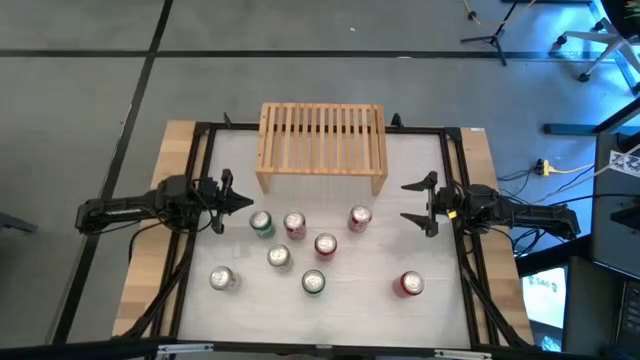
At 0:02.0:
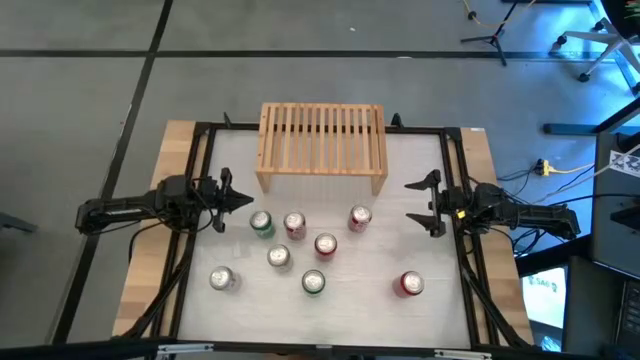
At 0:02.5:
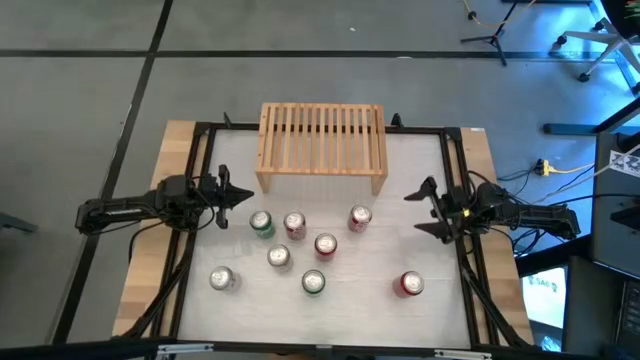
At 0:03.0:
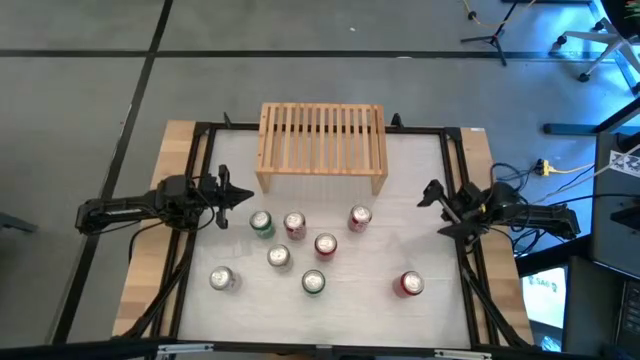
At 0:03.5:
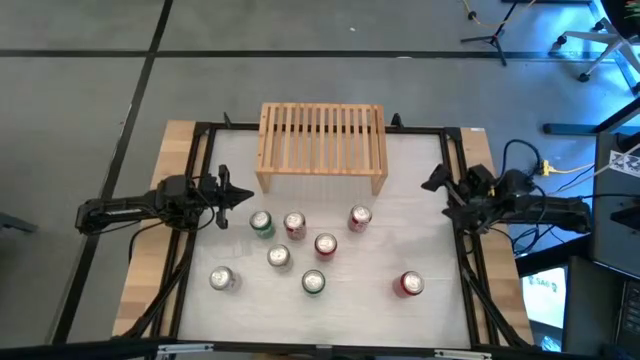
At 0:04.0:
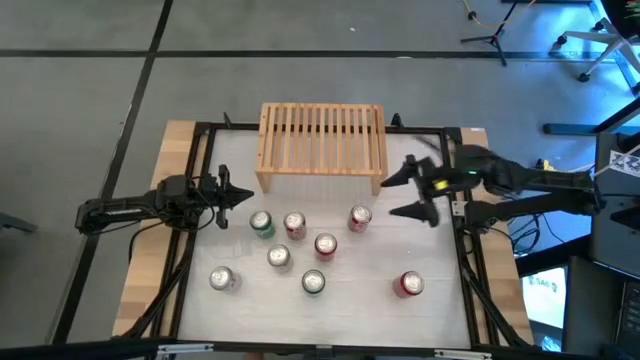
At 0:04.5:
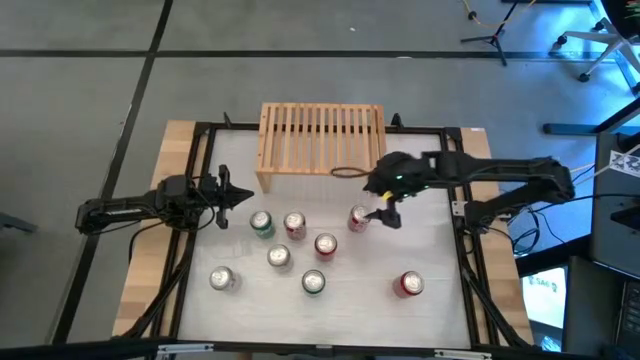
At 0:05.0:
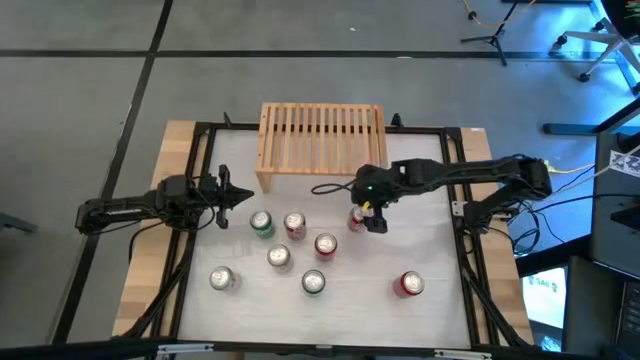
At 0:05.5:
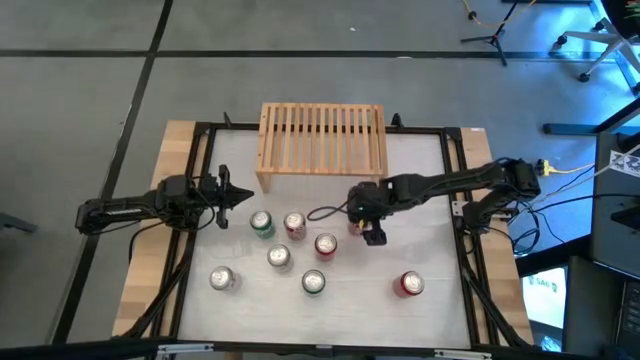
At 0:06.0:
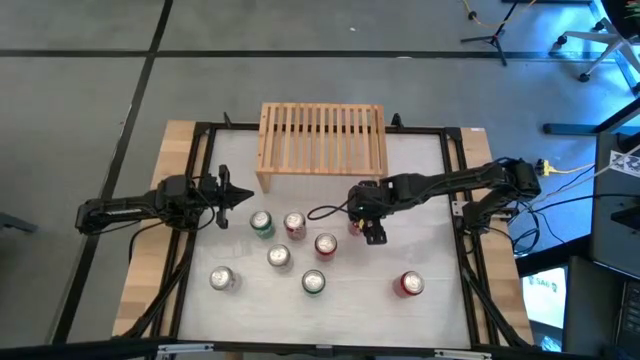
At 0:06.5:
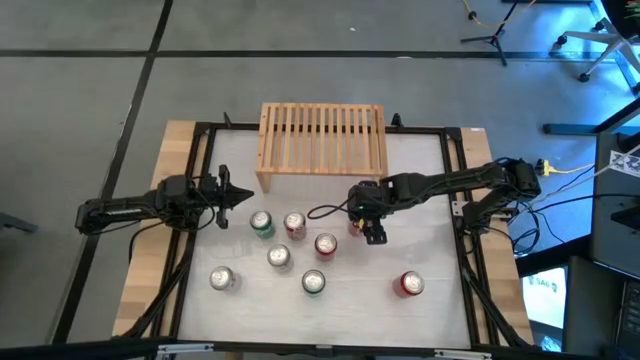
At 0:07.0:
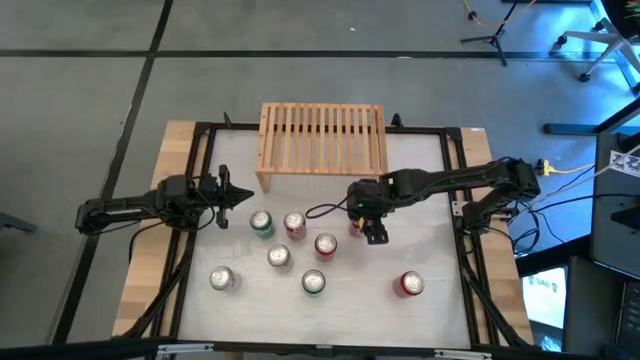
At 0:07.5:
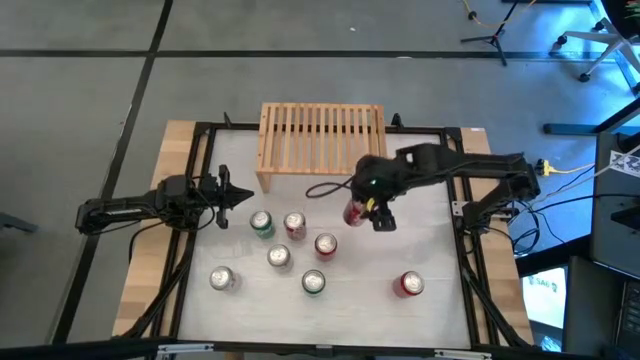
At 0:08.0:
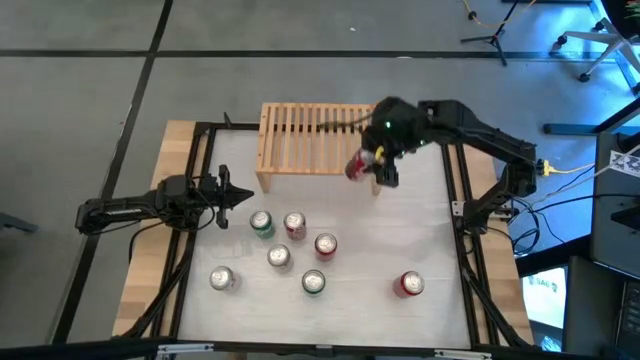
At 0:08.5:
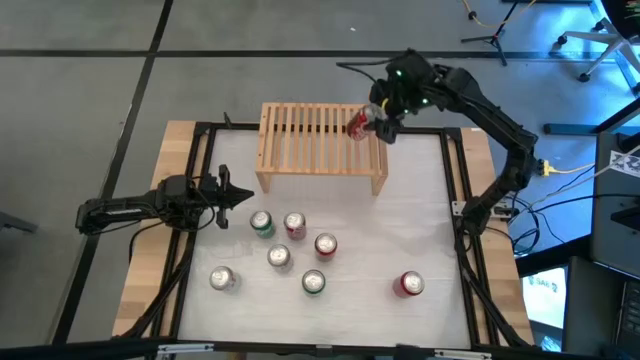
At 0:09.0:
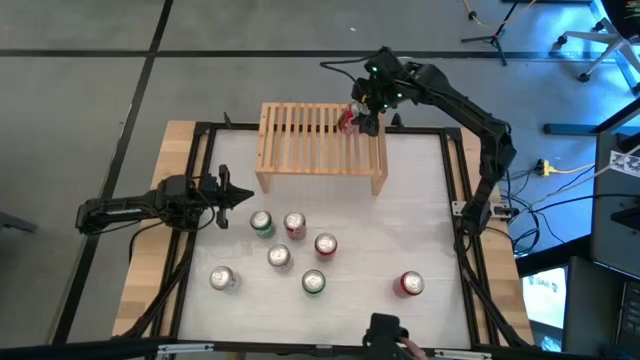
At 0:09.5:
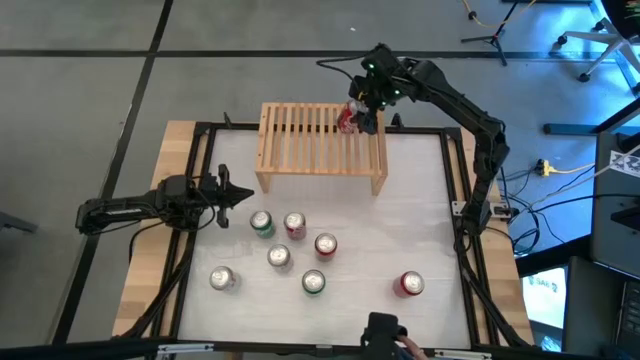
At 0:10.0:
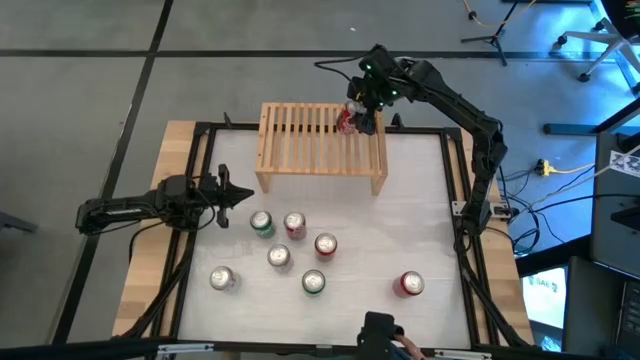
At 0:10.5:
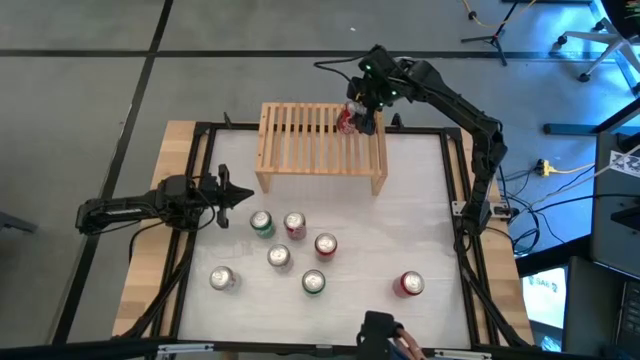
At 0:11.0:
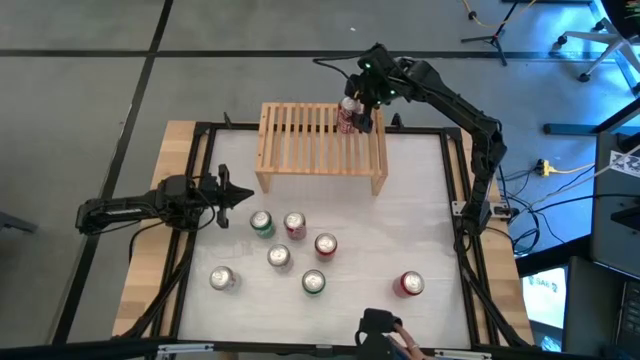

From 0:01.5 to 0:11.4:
Task: Place canned beverage on shelf
Put the right/white red soda can on the shelf

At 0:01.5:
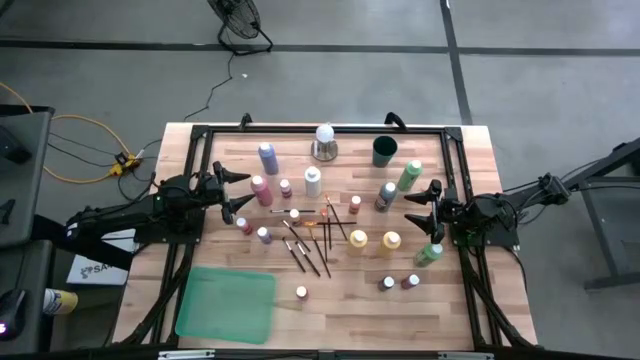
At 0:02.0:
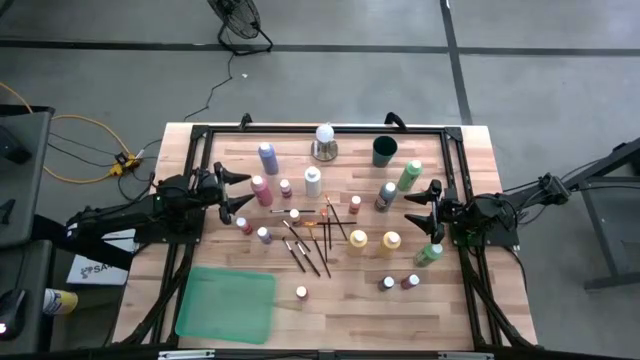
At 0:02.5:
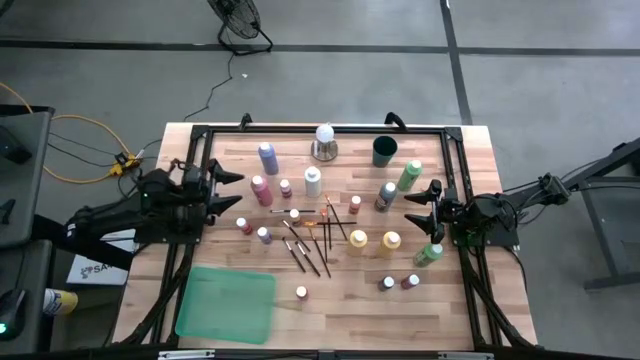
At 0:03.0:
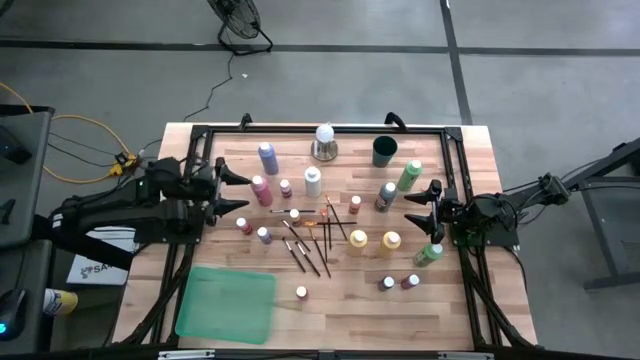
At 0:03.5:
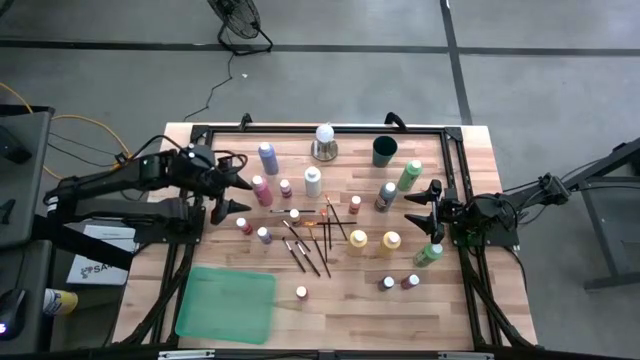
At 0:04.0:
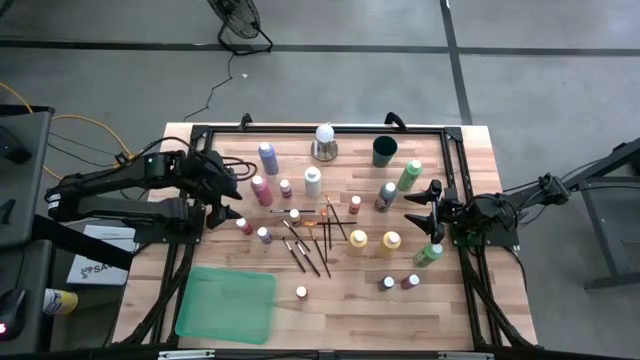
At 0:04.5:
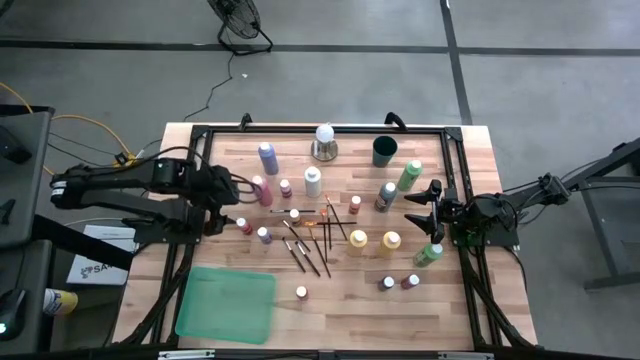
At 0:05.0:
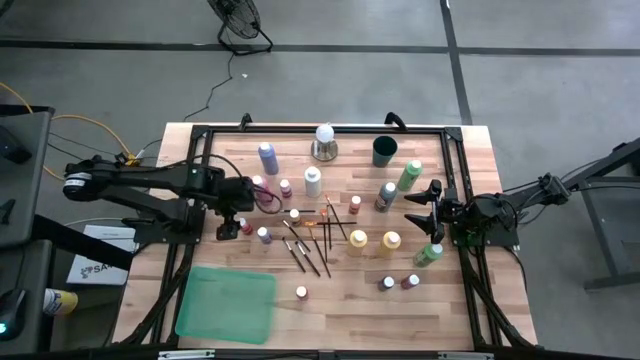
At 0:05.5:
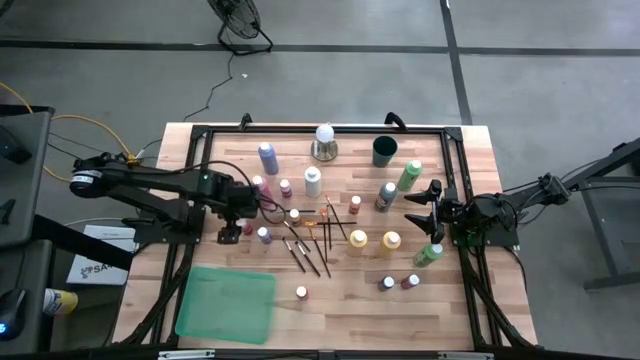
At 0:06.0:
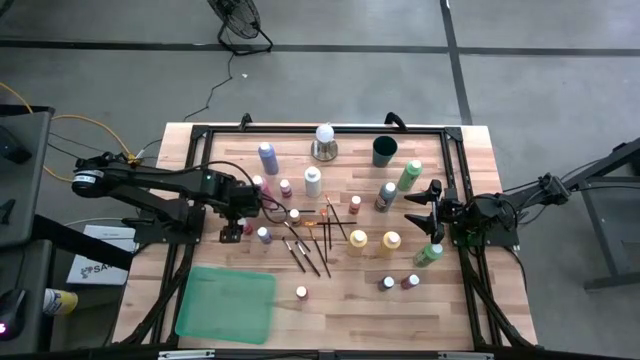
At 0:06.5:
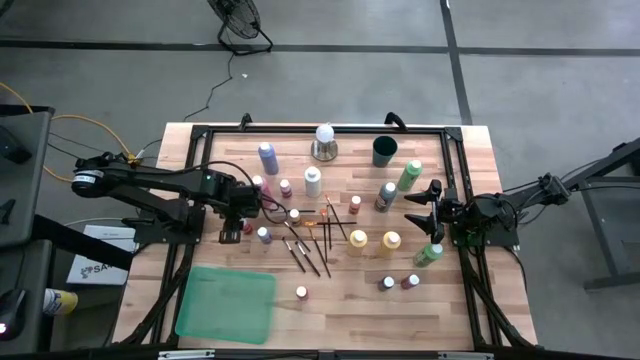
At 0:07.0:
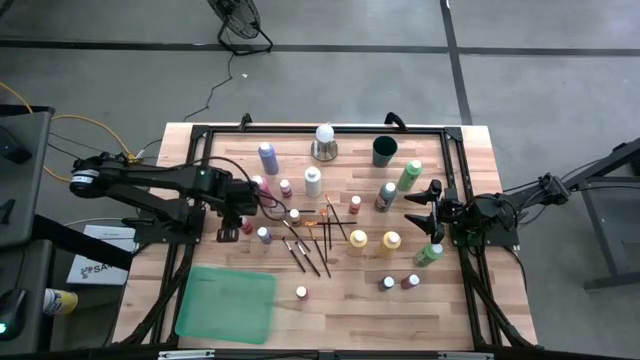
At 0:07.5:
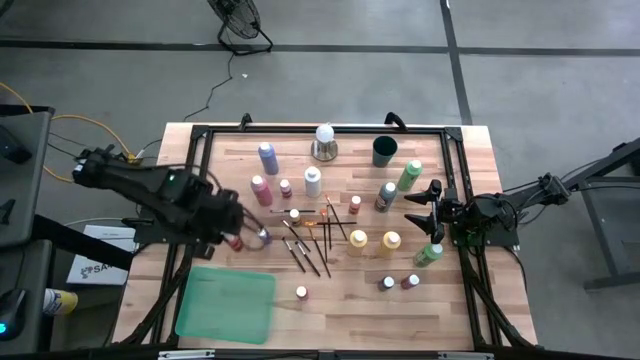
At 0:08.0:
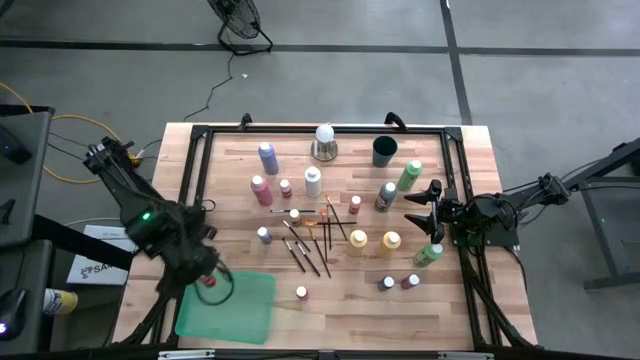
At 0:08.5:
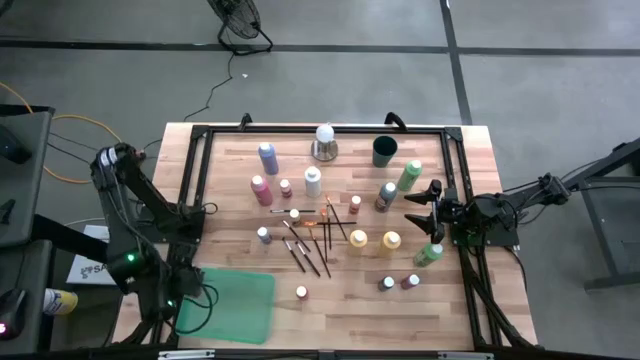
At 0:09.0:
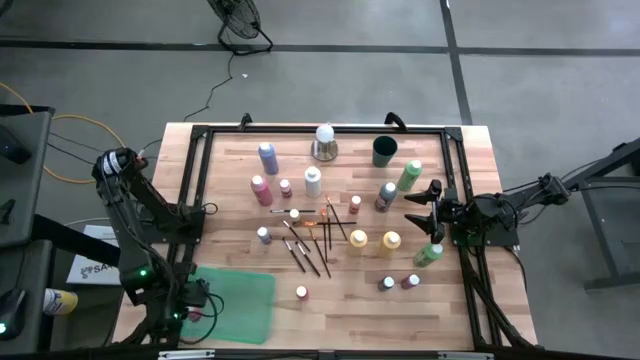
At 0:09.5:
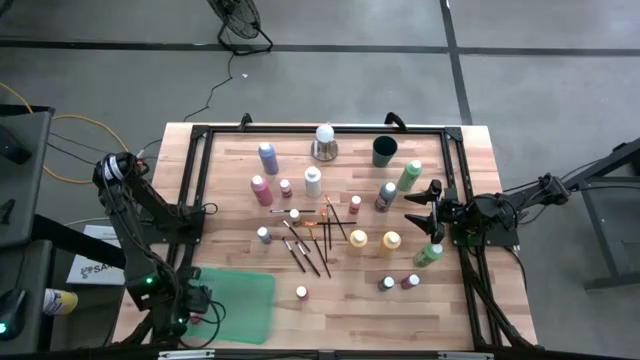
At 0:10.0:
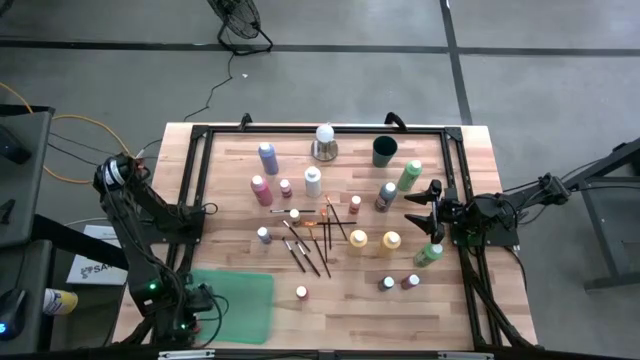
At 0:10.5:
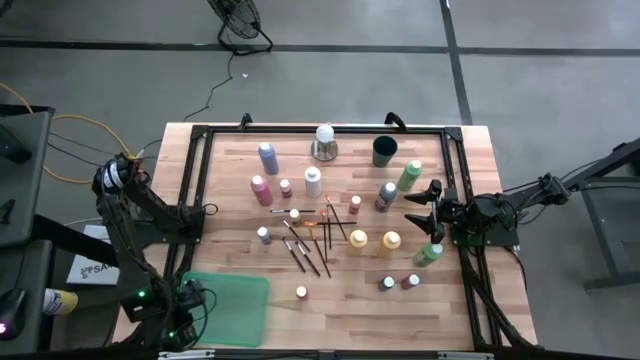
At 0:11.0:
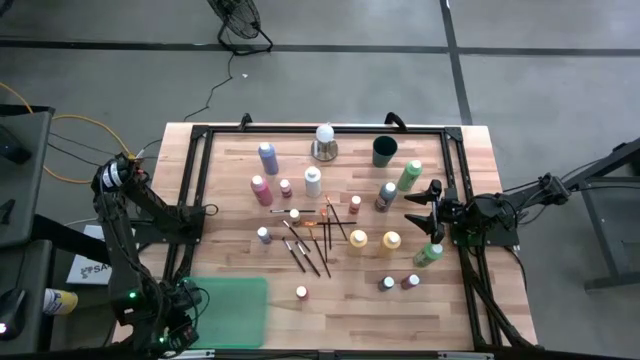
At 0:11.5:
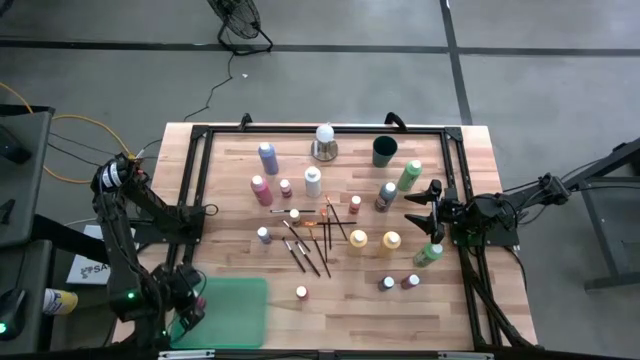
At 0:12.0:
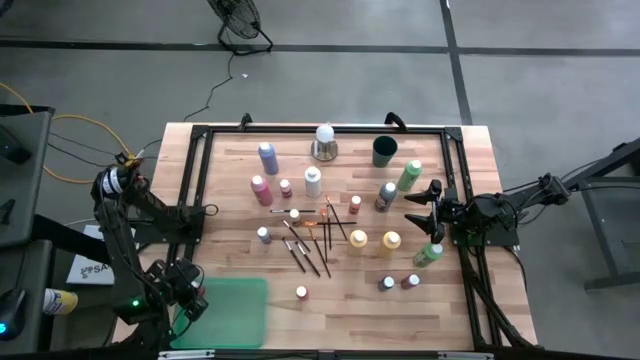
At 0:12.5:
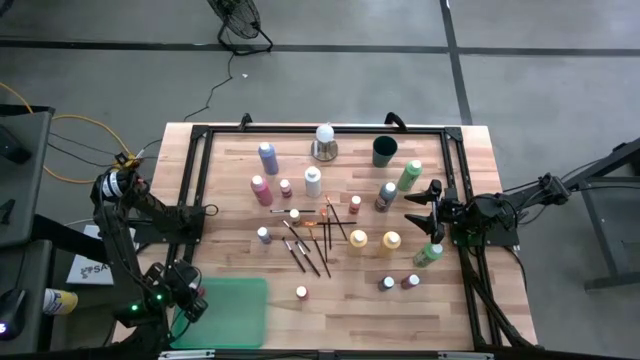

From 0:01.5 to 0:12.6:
Task: Pick & Place Paint Supplies
Put the orange paint bottle into the green bin
